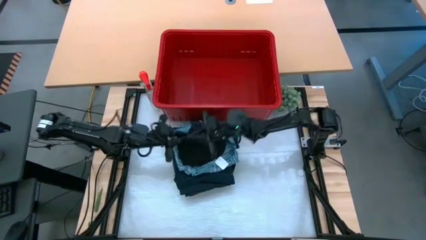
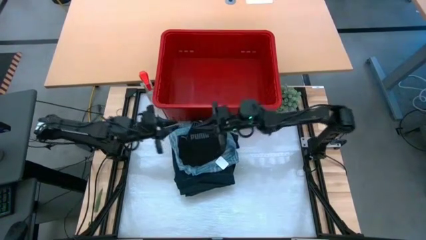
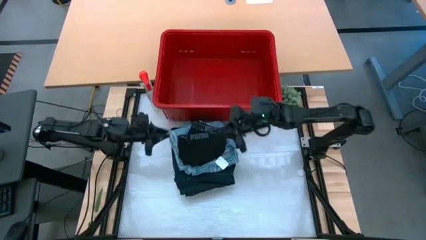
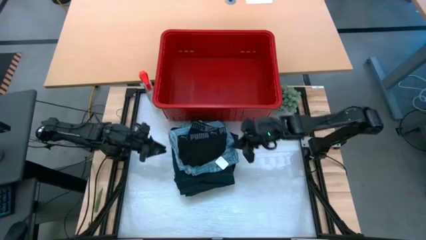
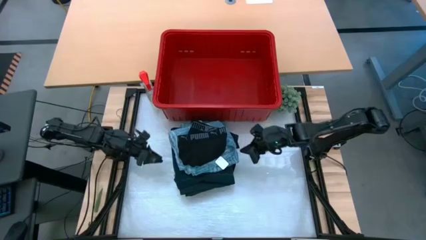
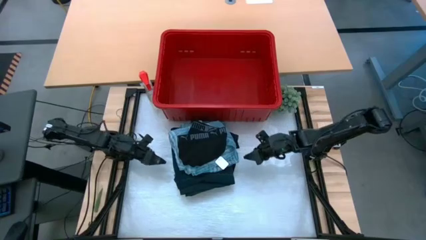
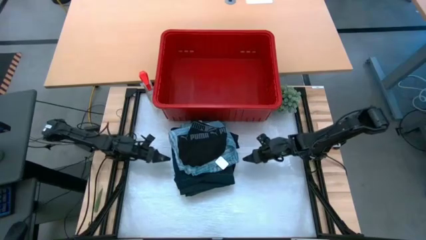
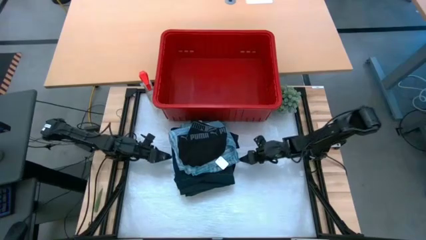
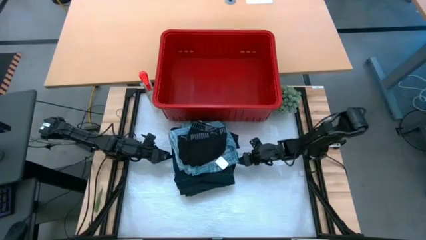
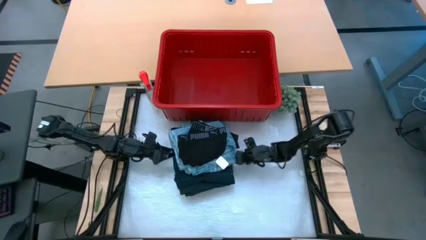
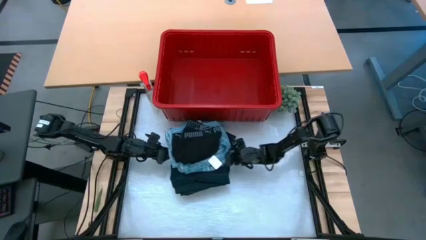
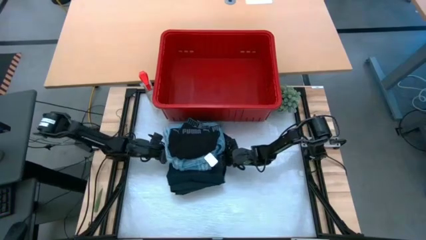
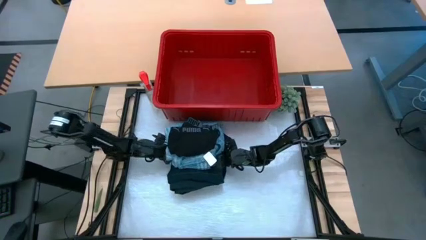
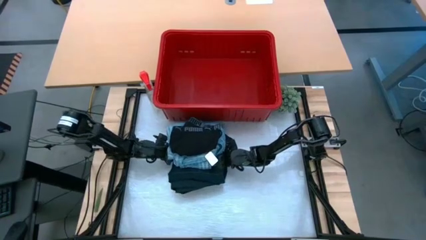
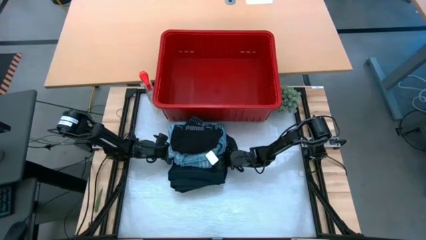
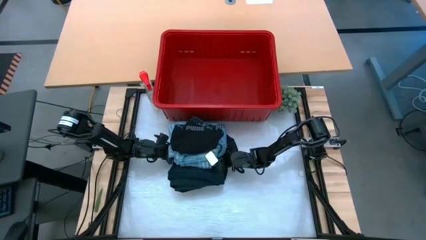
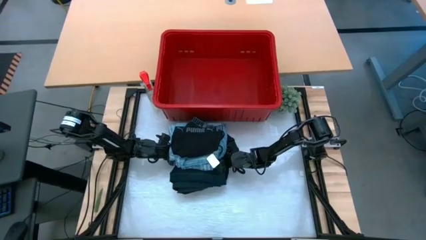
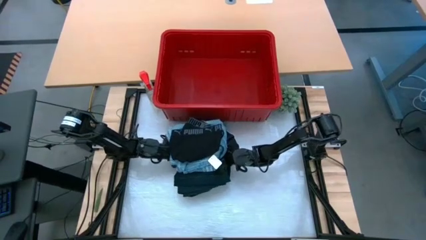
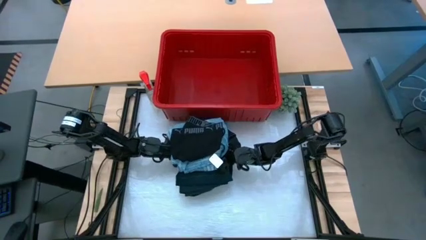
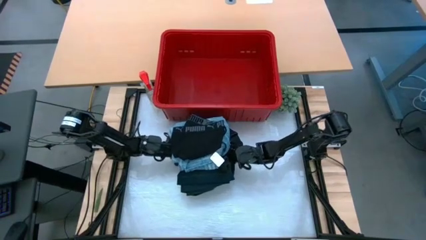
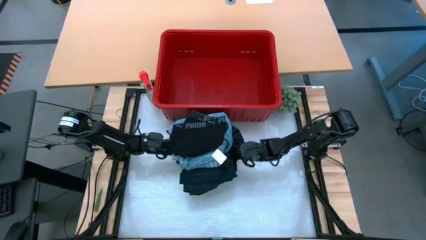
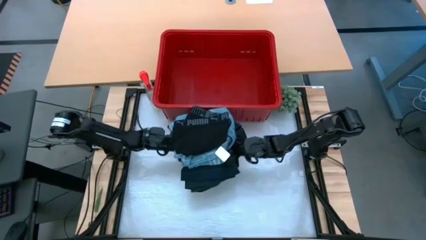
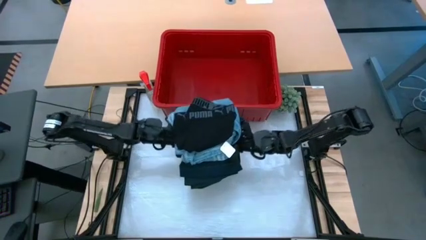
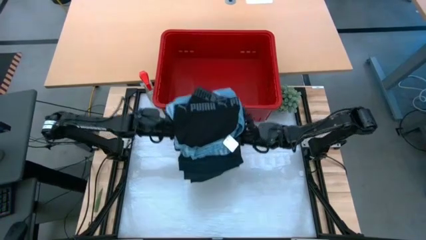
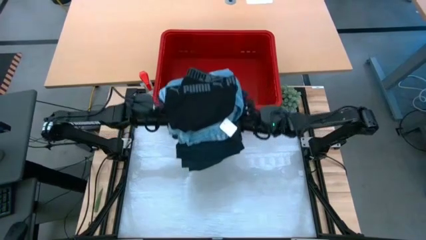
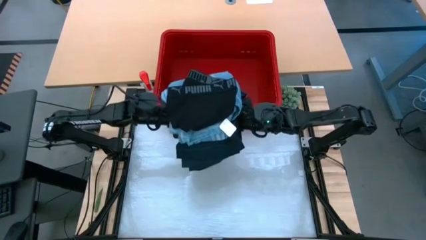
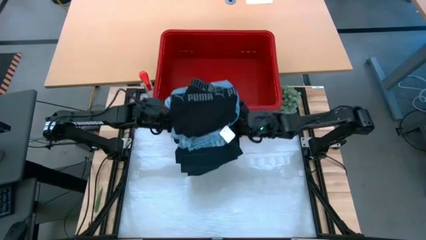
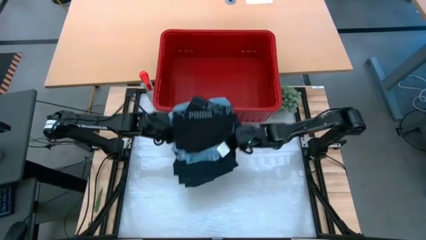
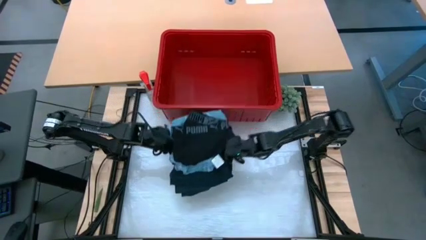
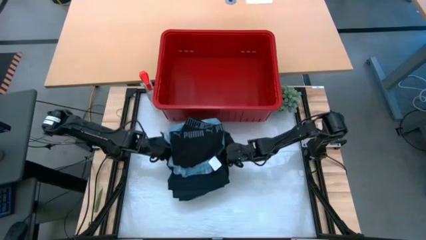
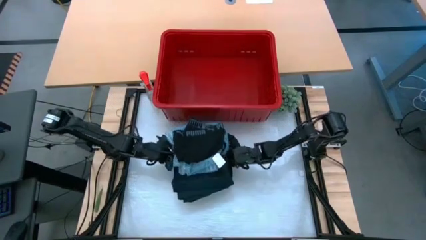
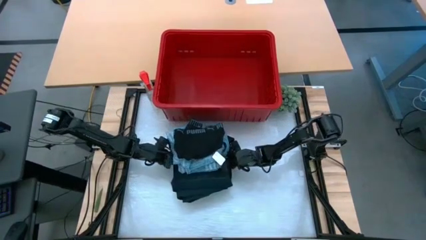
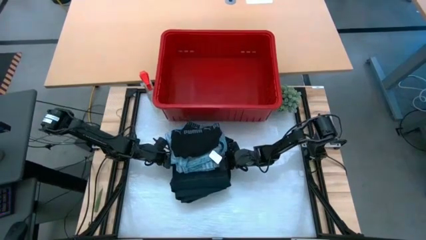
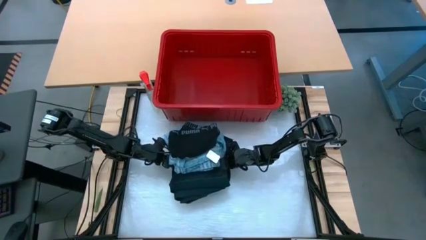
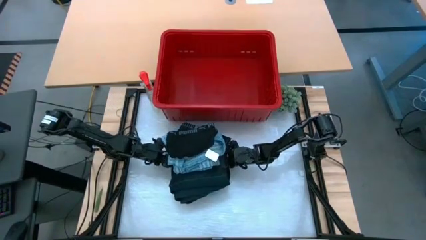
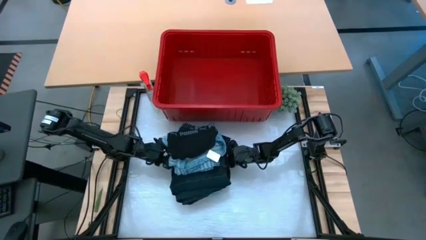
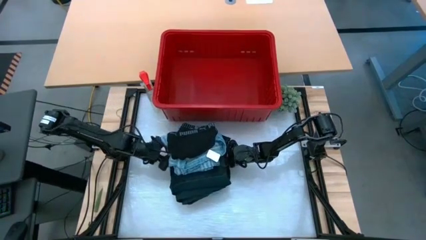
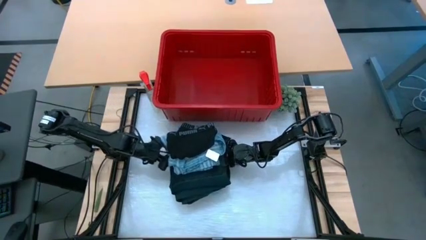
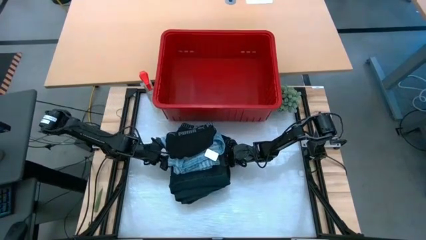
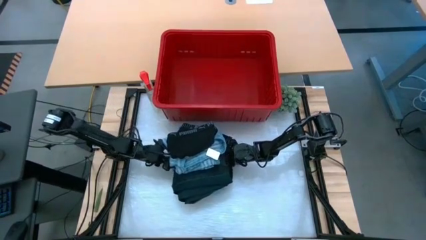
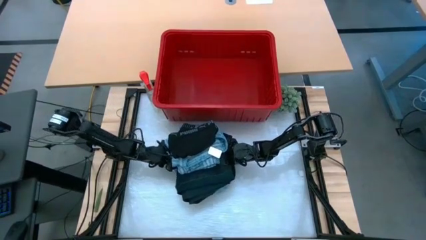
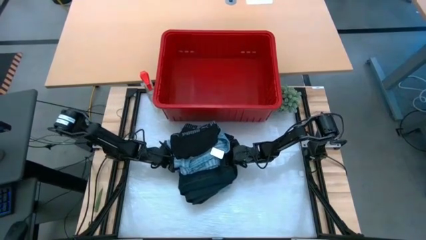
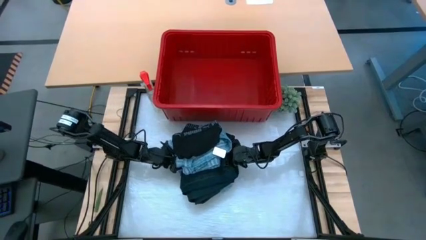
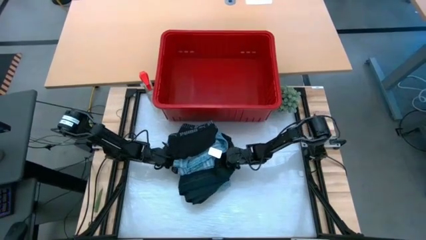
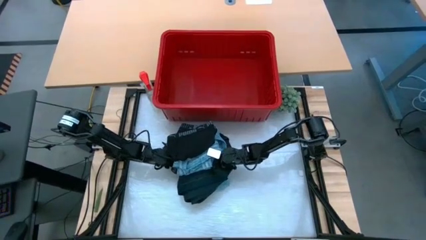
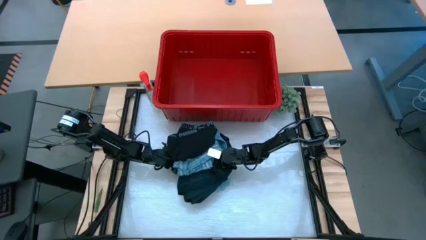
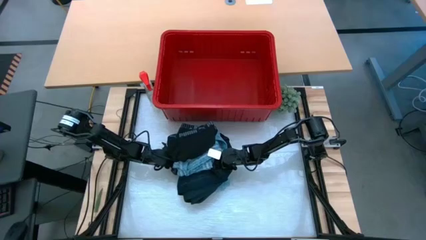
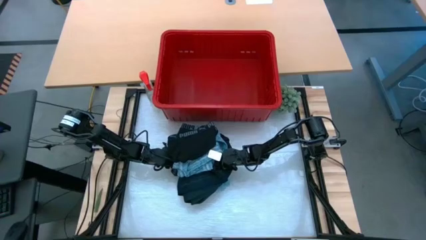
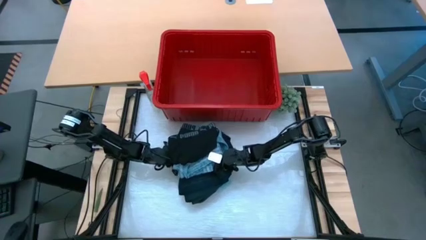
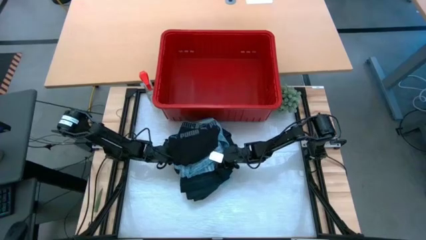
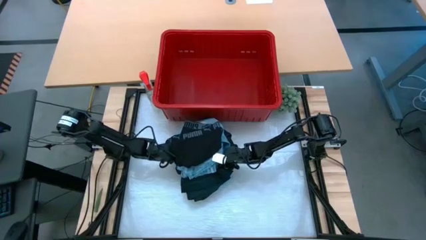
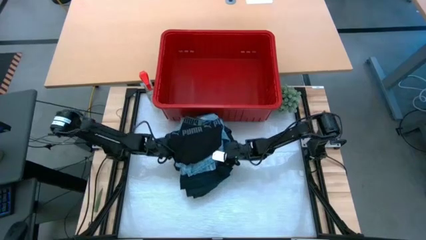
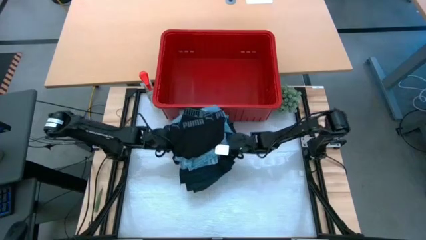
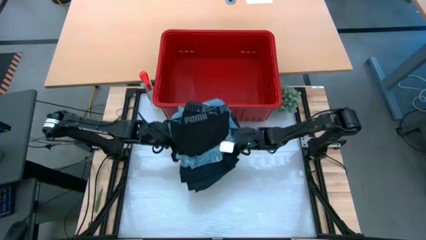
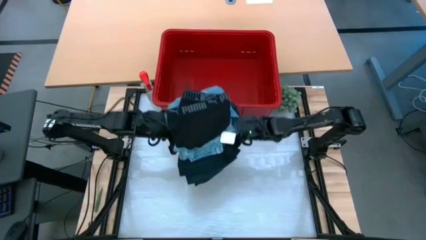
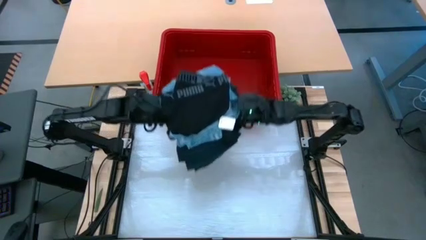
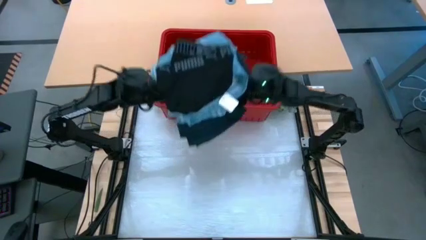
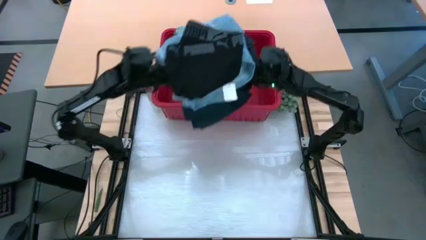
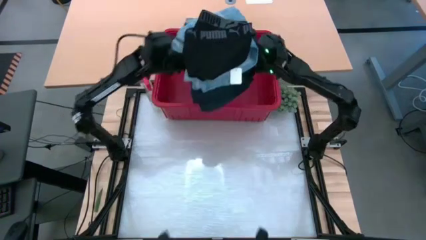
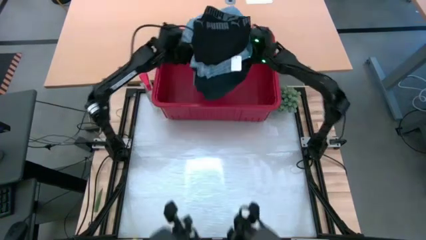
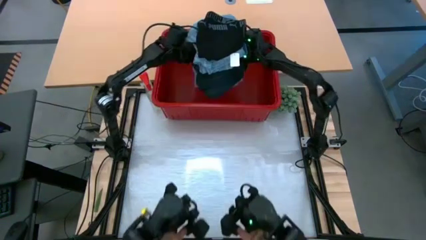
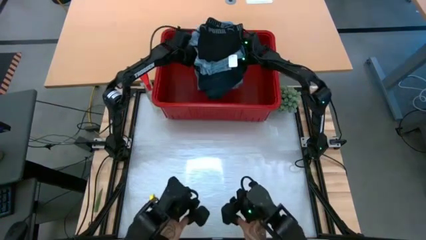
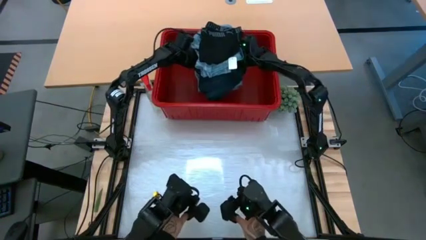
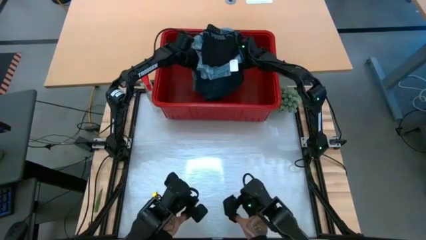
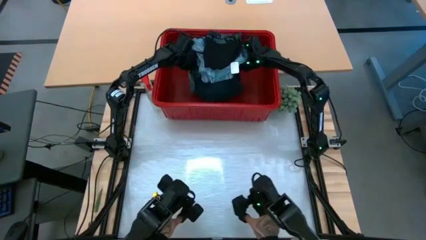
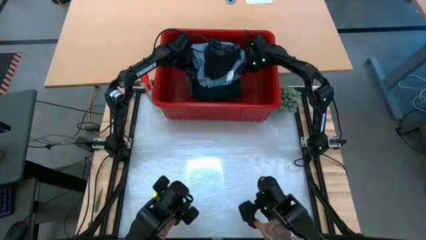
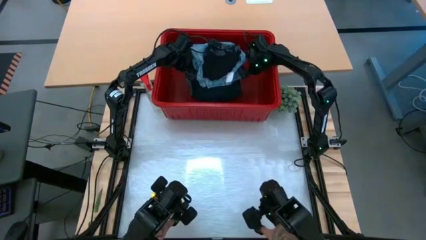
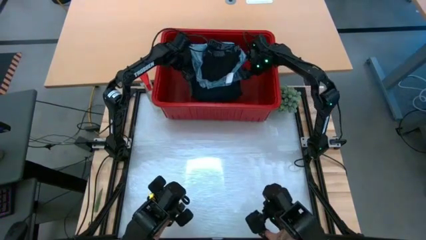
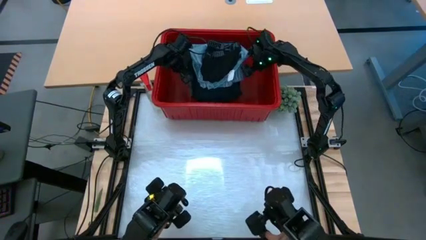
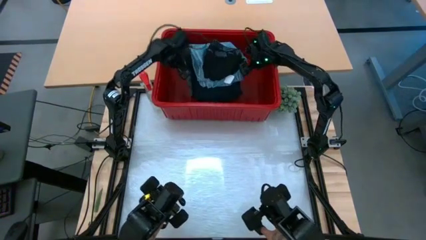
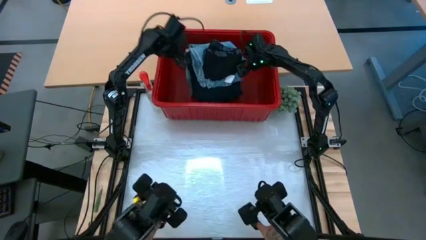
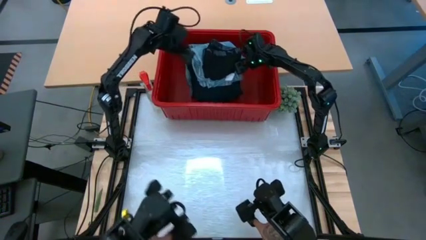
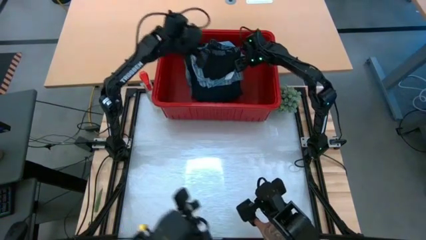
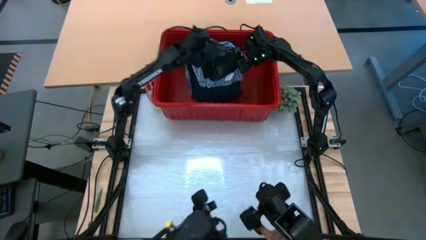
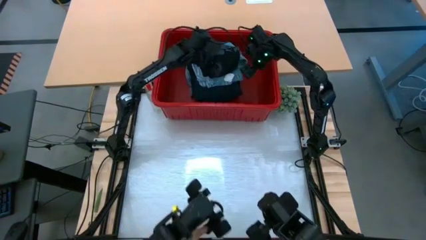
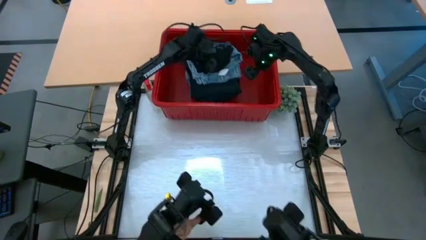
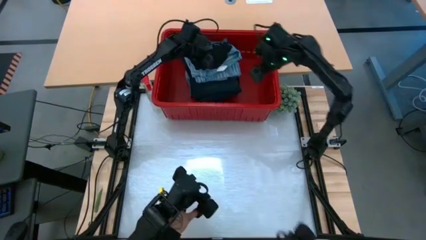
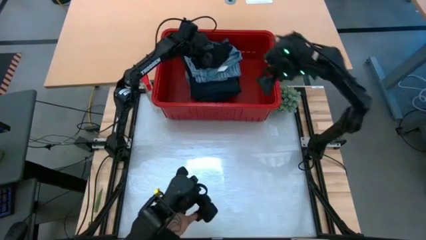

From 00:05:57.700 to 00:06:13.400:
Task: Fold Laundry from Bin
Put the folded clothes into the red laundry bin

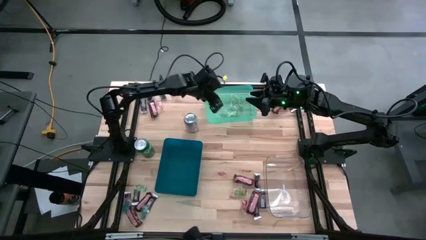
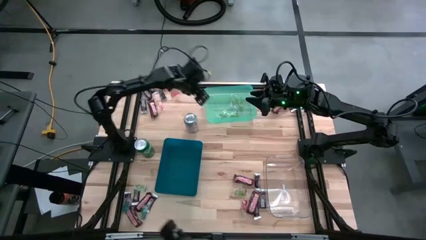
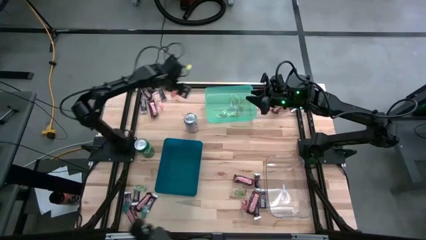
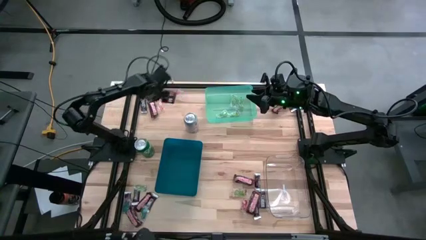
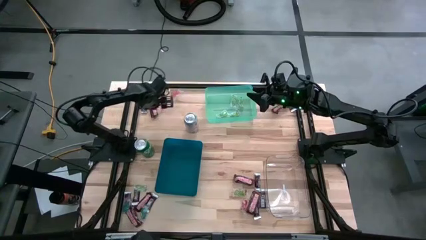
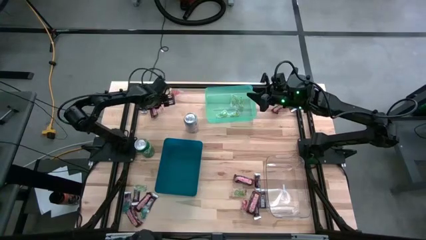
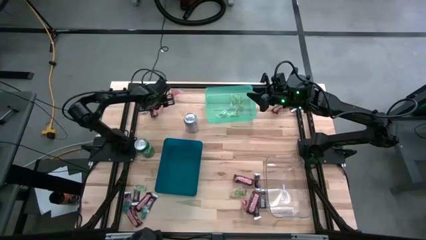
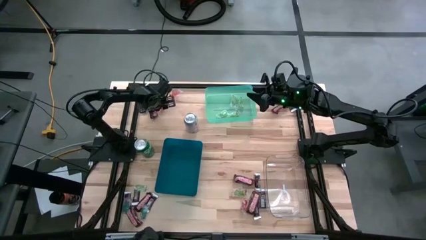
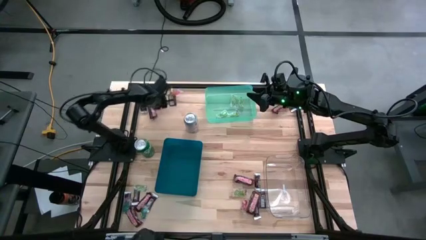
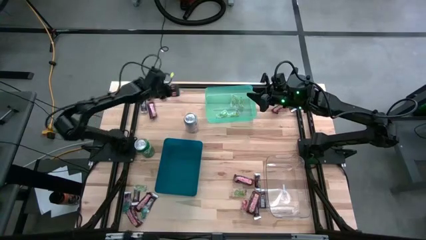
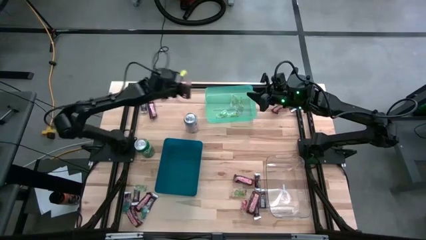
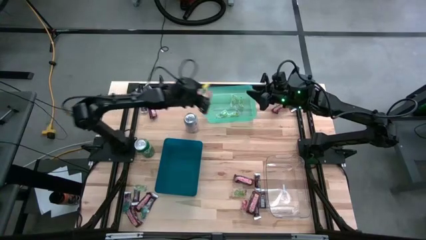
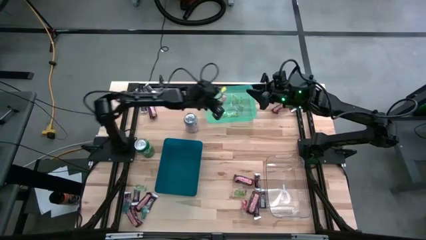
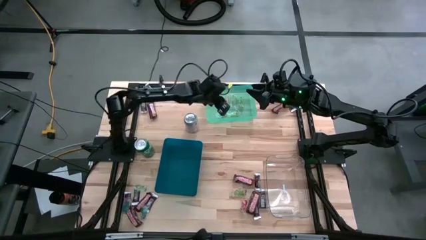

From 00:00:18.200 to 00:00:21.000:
Task: Organize candy in baskets
Put the transparent gummy into the green bin
